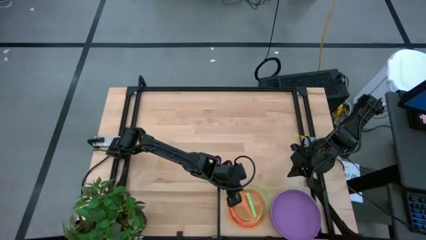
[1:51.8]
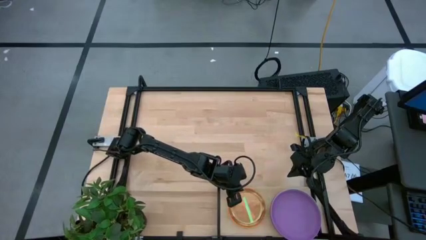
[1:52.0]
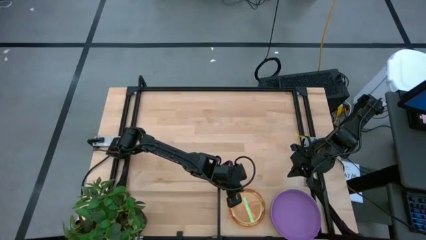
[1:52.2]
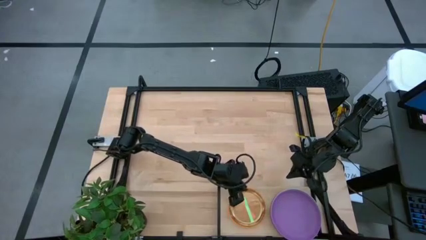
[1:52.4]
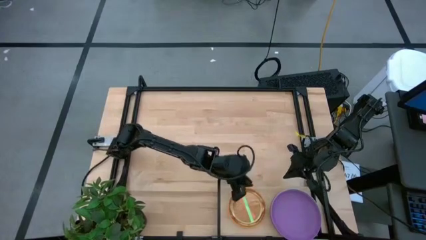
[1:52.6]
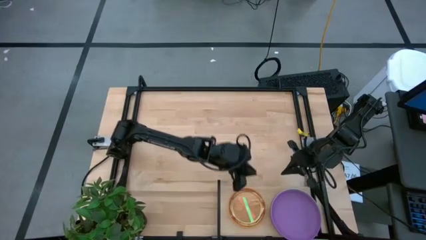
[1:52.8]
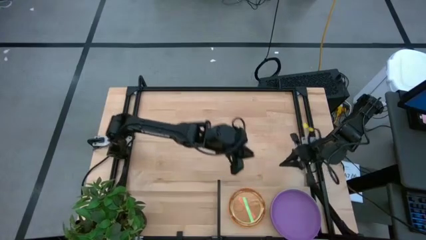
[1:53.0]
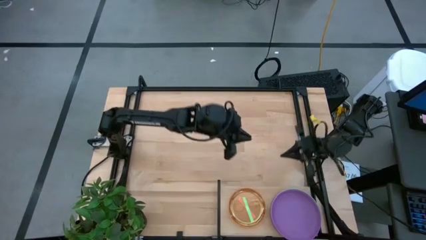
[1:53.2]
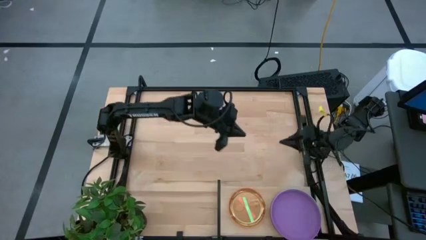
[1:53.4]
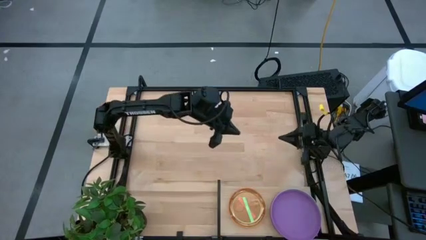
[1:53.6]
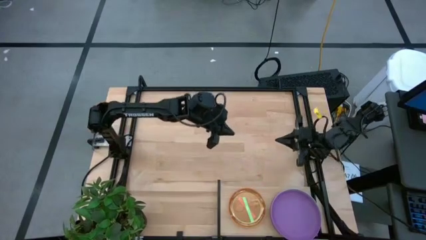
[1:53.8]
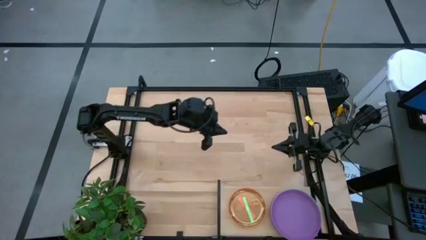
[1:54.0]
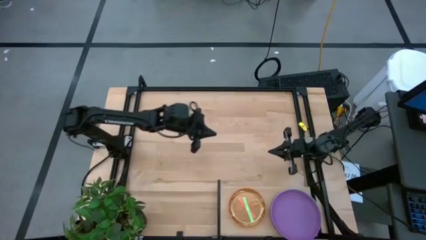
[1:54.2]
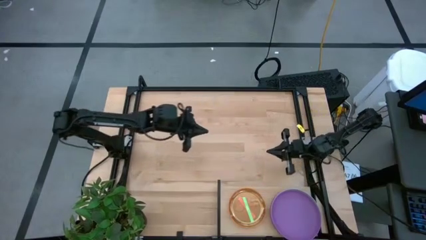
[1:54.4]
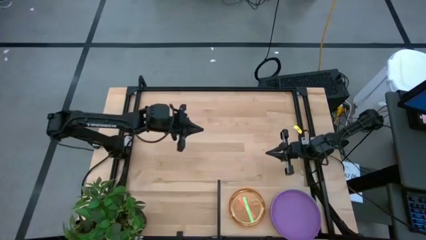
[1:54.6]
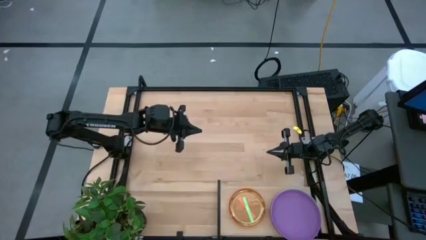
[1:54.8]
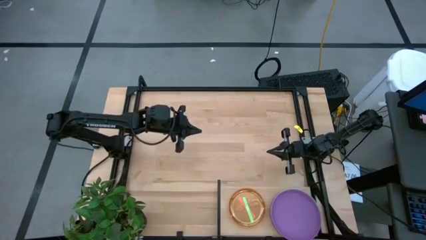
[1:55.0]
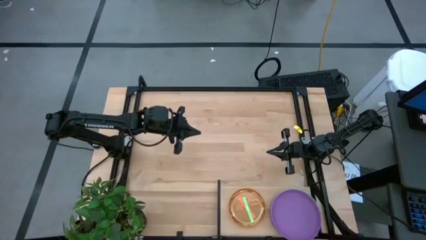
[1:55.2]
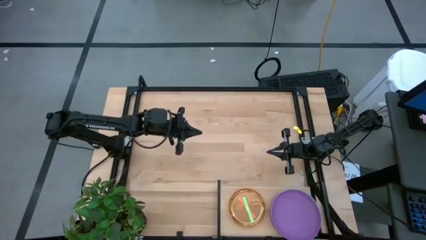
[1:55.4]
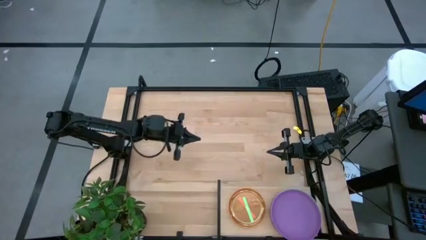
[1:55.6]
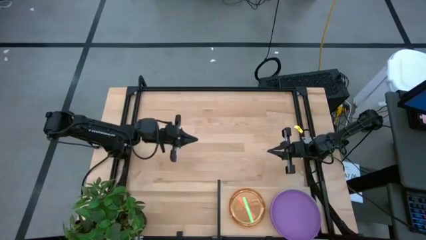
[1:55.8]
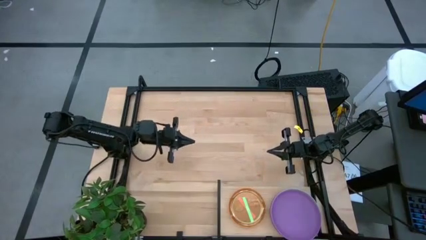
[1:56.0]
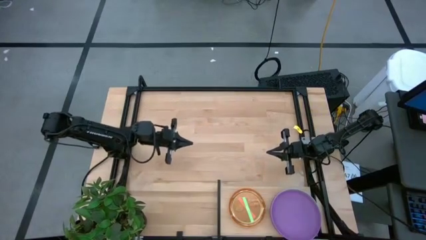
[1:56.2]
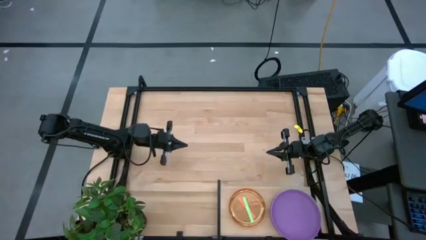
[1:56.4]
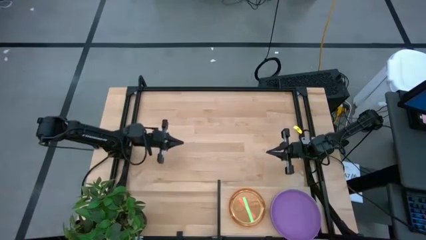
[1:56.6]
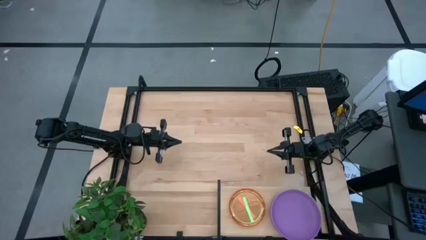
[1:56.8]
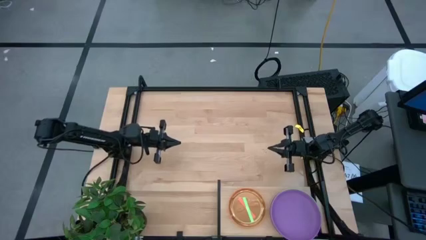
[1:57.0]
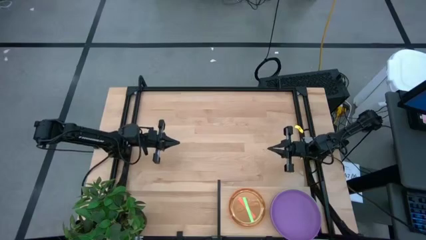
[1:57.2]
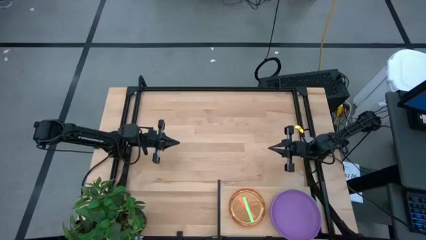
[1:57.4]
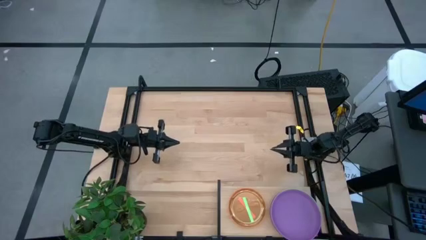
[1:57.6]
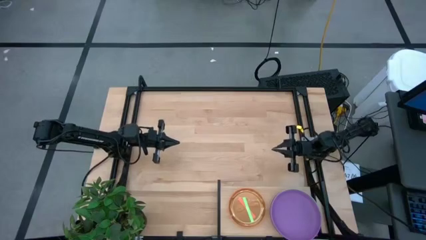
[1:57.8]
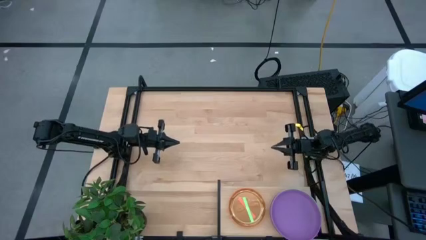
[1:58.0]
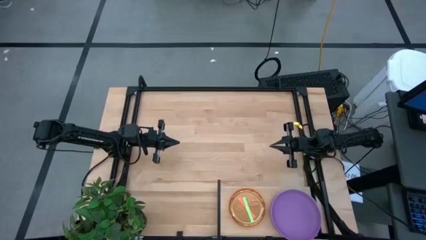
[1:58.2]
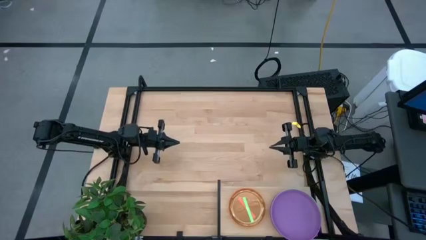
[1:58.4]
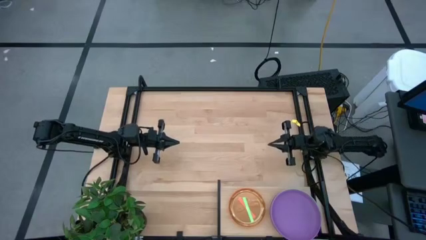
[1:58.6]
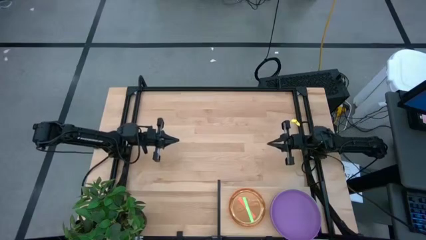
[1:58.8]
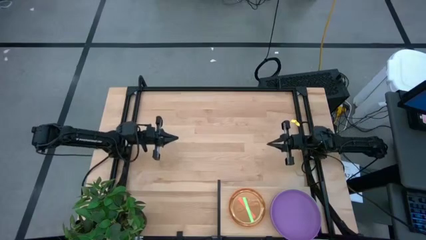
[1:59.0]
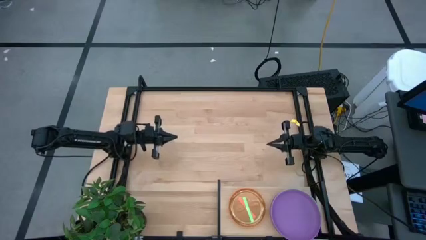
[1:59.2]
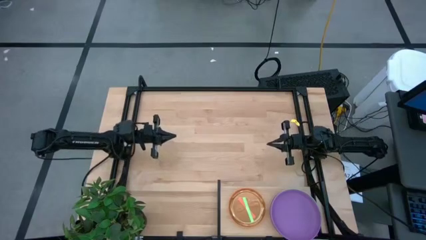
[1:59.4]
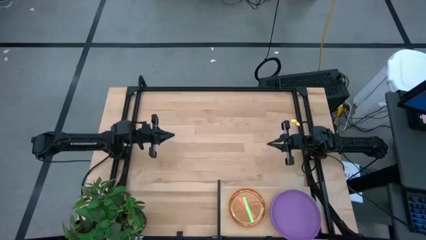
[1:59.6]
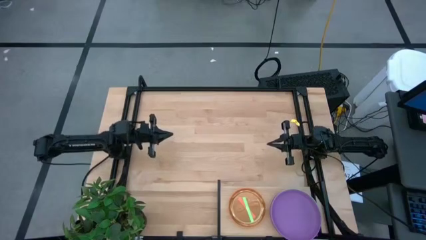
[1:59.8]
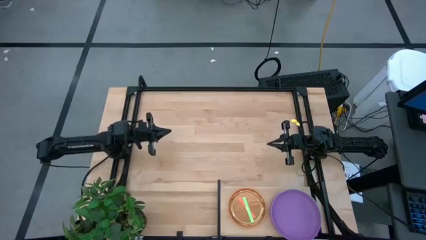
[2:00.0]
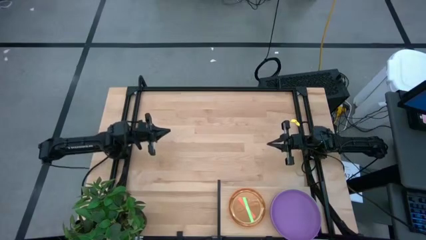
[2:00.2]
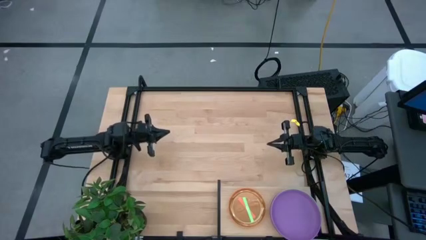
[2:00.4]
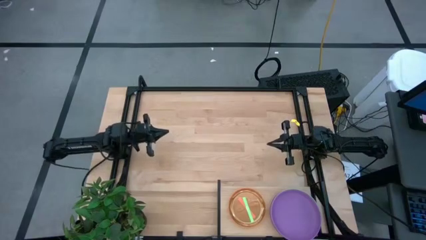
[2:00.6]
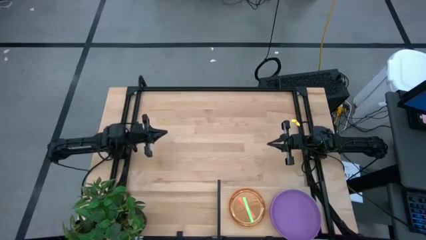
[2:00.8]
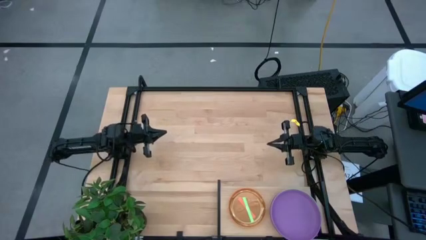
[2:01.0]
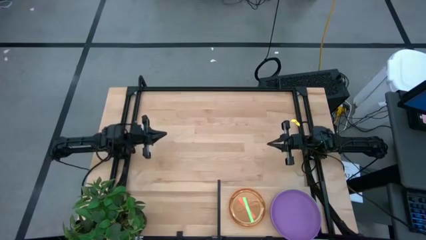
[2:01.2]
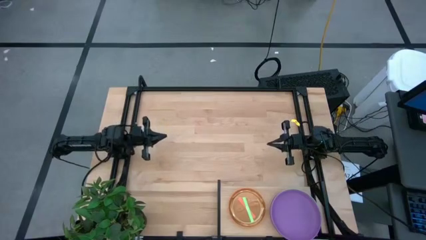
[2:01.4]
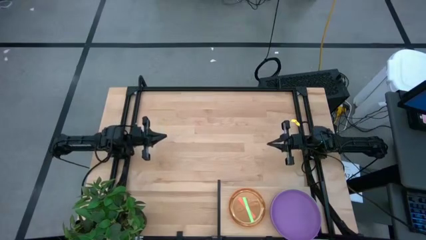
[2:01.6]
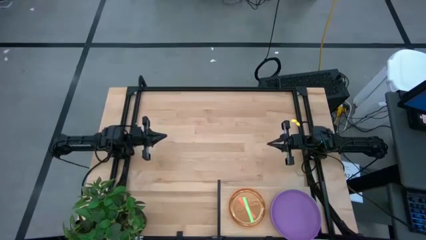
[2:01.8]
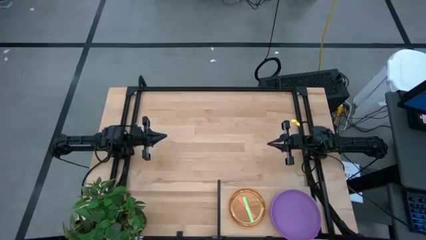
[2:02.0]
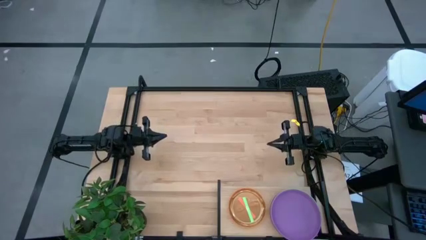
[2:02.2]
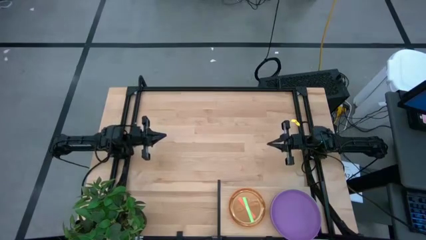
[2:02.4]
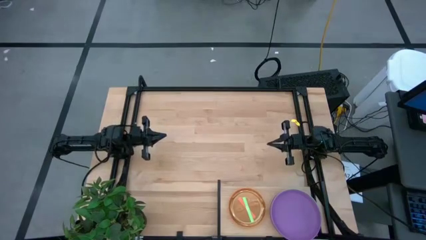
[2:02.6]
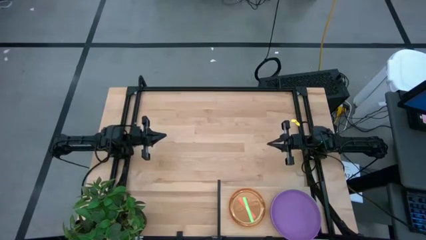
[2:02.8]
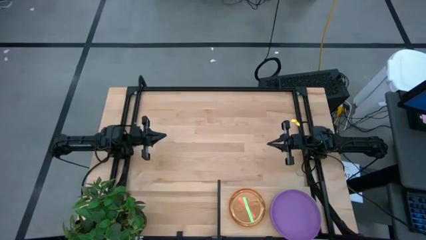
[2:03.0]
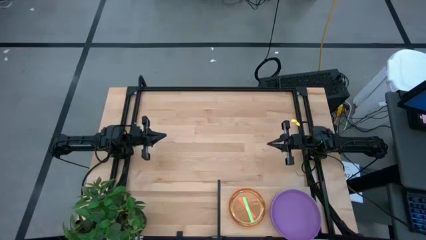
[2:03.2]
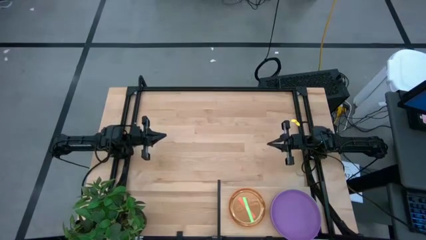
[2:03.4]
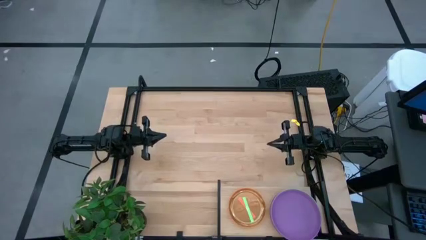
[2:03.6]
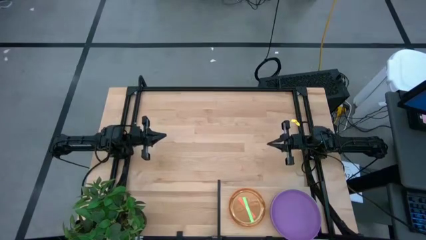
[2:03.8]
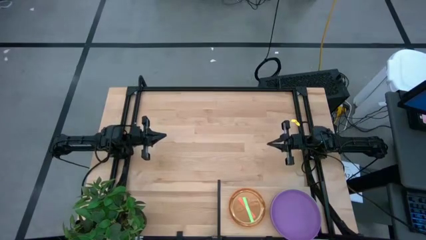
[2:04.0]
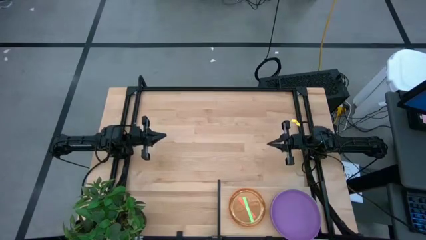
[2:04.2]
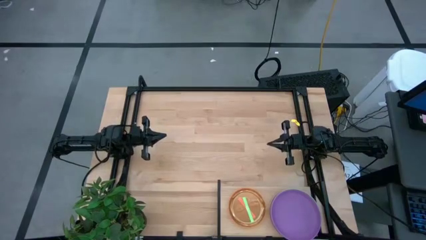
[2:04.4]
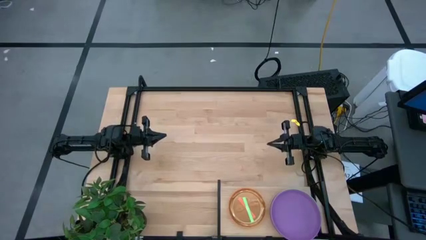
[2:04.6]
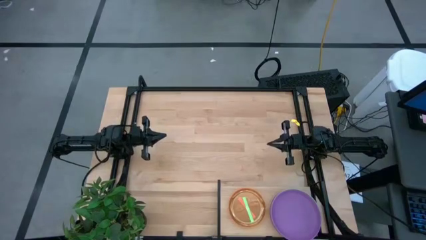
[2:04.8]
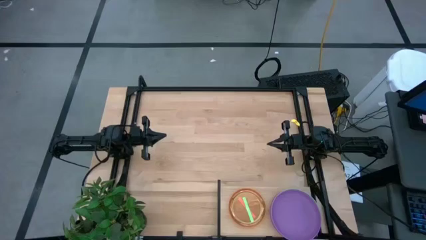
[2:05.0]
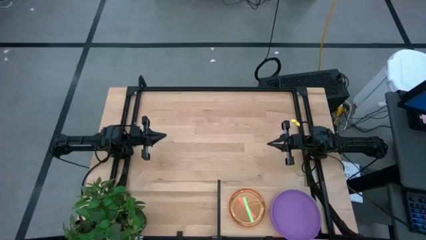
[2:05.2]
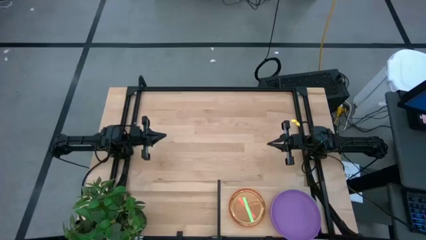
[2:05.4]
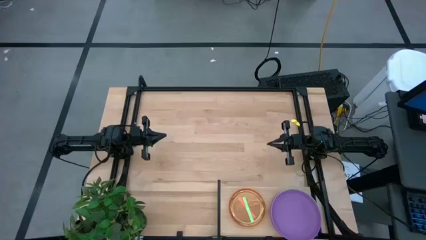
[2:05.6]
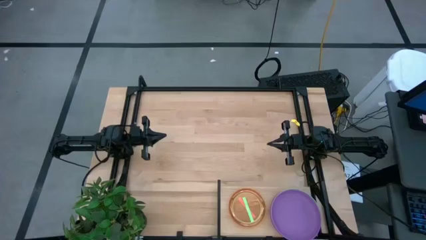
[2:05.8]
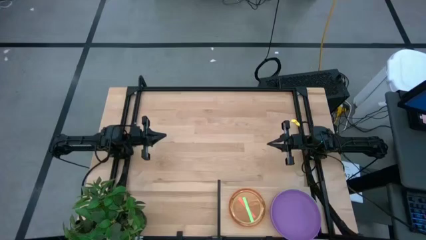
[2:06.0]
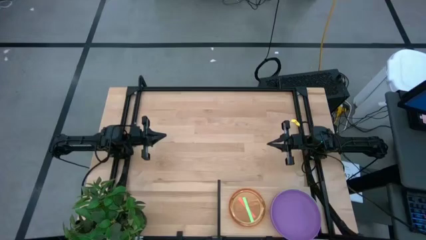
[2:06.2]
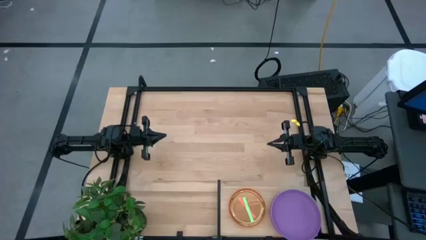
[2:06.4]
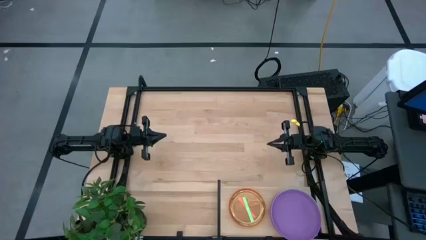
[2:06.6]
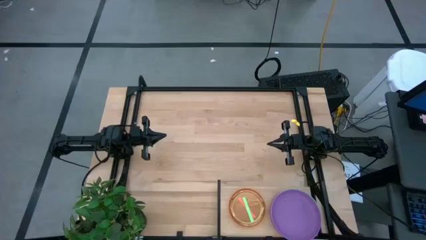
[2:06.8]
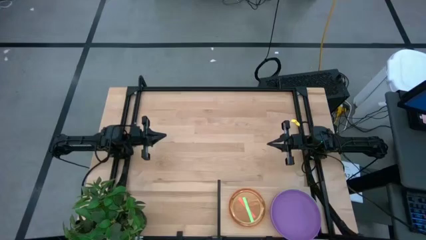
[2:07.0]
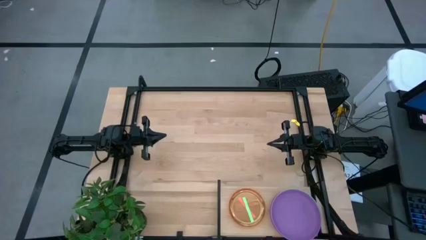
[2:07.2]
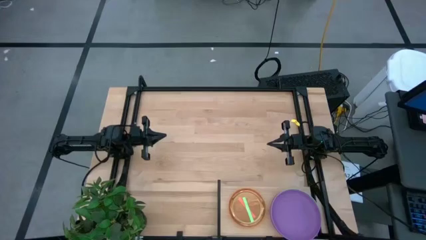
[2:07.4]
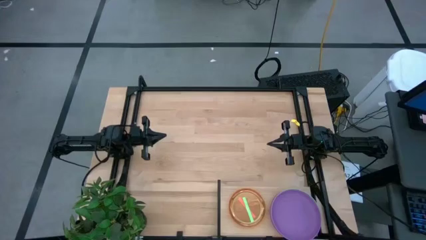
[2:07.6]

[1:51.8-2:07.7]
Task: Place and stack plates onto a shelf
Return to Home Position

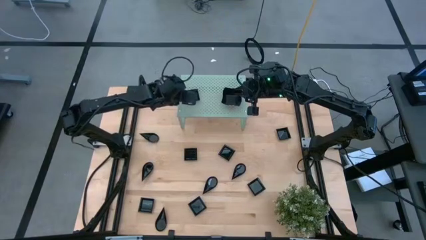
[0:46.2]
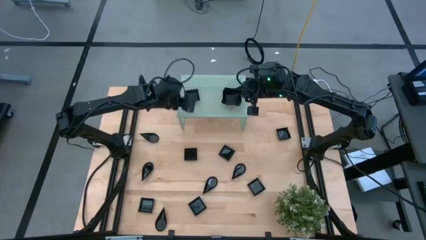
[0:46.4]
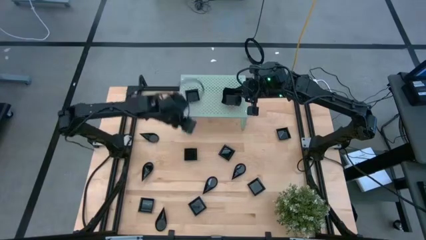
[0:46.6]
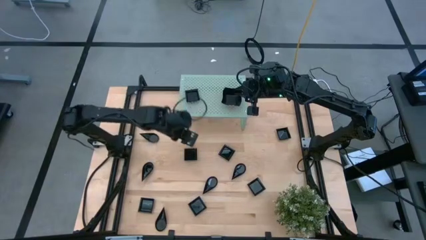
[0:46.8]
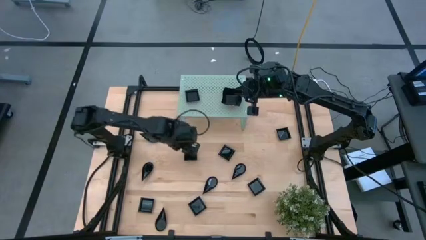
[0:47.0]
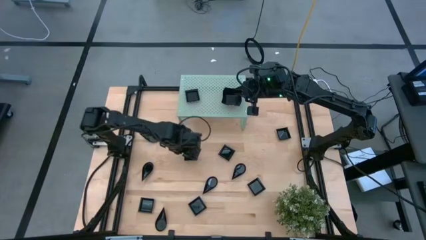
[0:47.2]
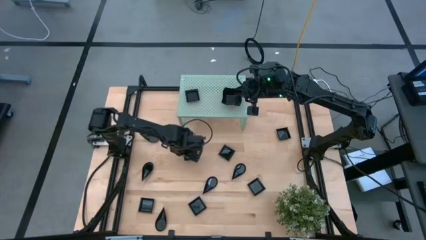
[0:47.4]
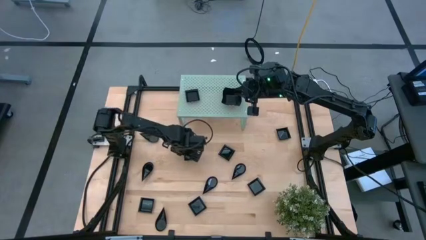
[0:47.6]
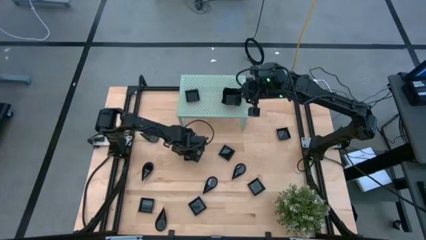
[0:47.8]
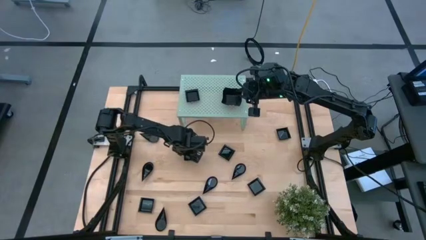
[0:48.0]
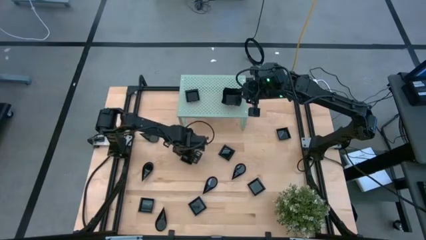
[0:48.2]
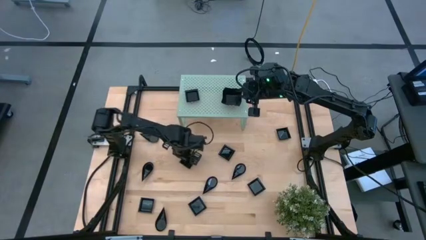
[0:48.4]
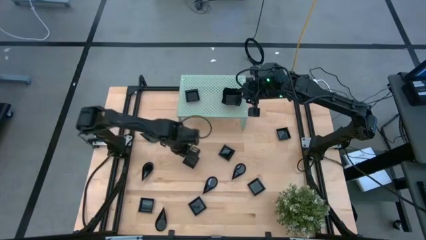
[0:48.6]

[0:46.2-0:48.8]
Task: Pick & Place Mini shaped plates
Stack the black square plate on top of the other black square plate on the shelf
